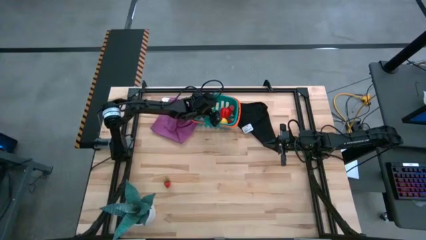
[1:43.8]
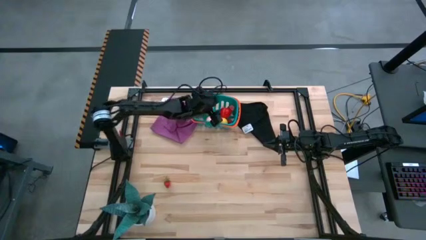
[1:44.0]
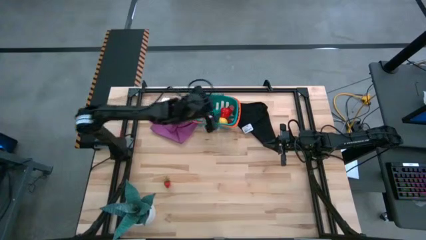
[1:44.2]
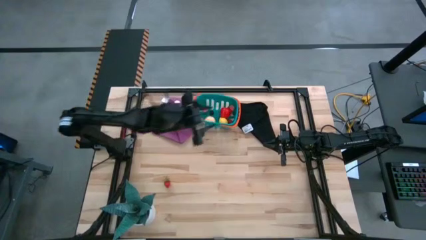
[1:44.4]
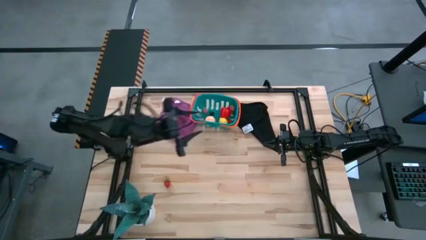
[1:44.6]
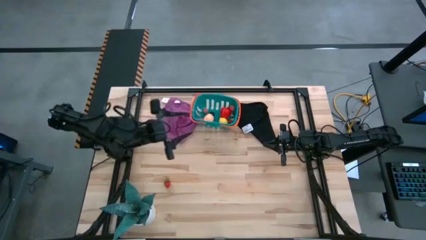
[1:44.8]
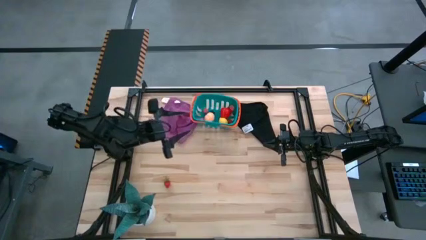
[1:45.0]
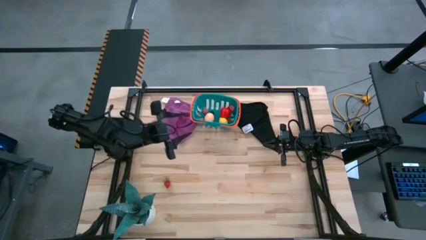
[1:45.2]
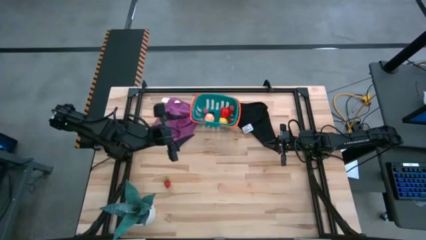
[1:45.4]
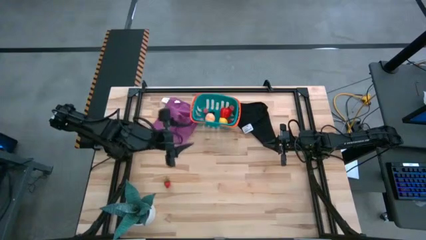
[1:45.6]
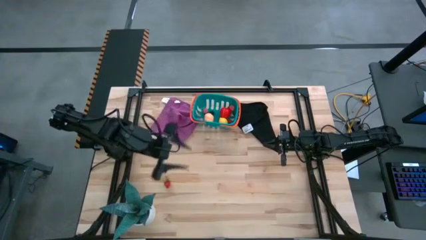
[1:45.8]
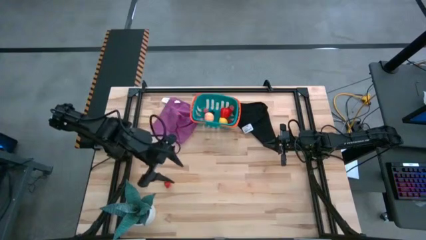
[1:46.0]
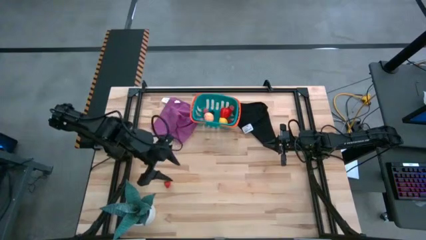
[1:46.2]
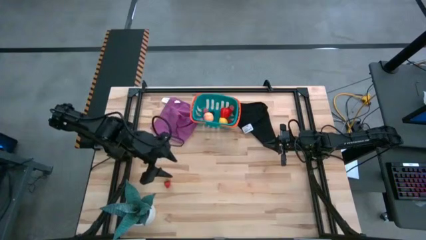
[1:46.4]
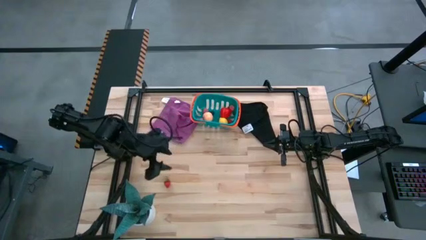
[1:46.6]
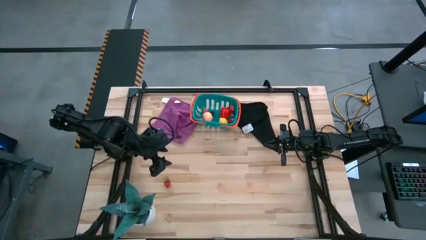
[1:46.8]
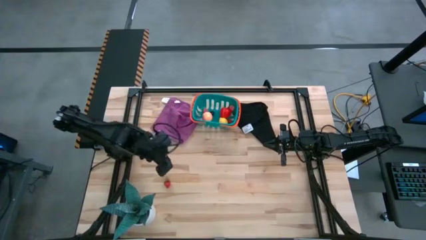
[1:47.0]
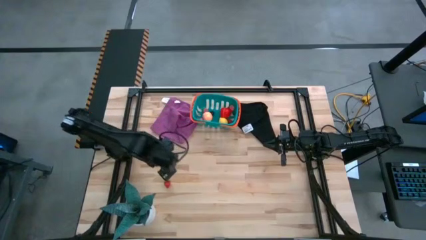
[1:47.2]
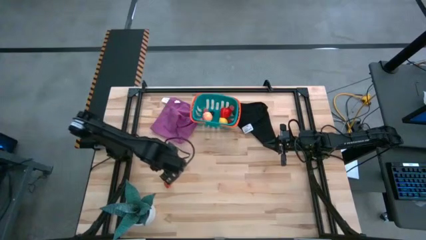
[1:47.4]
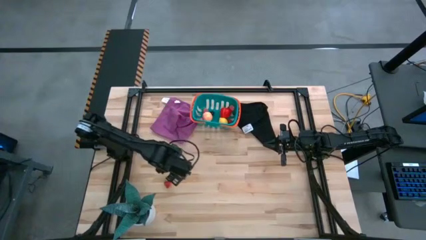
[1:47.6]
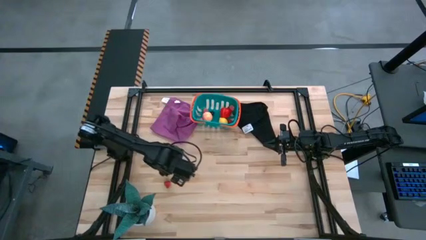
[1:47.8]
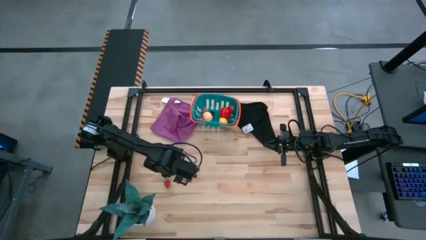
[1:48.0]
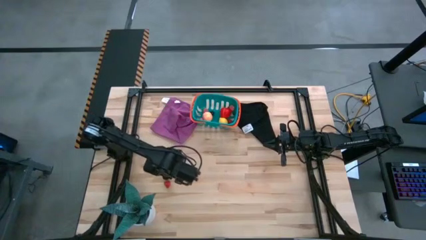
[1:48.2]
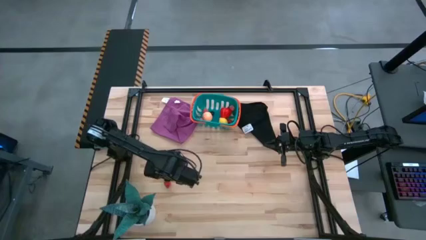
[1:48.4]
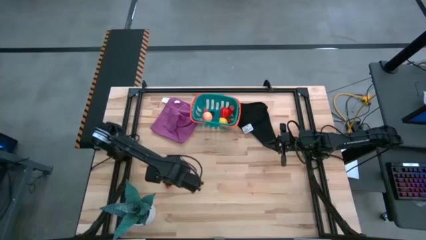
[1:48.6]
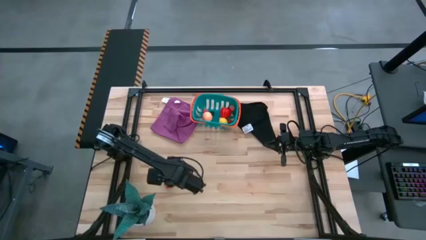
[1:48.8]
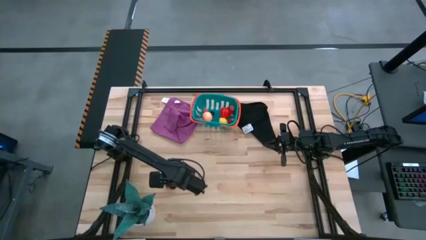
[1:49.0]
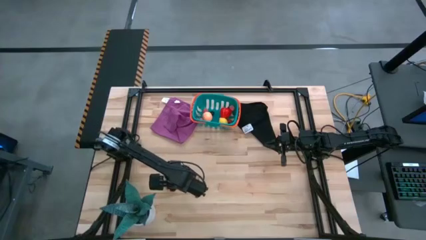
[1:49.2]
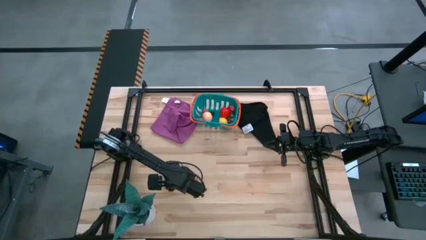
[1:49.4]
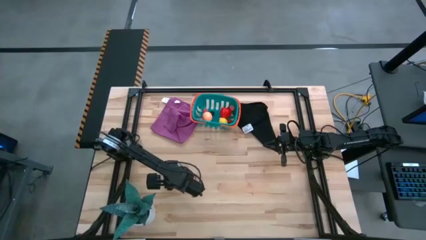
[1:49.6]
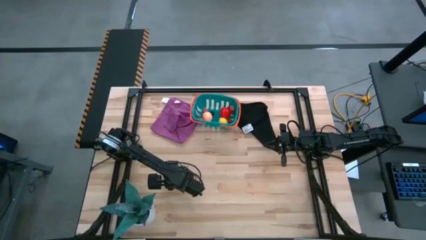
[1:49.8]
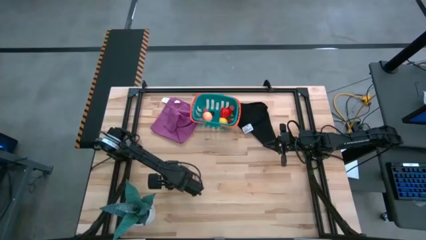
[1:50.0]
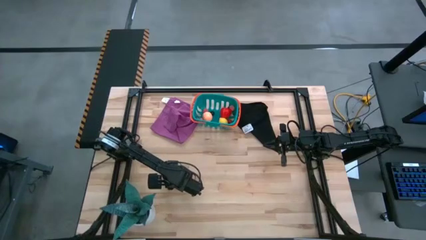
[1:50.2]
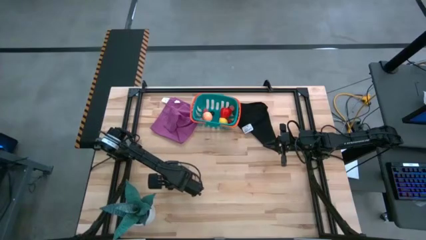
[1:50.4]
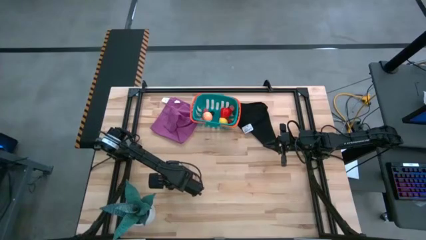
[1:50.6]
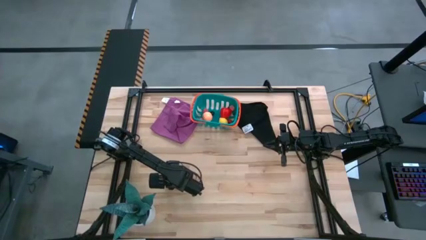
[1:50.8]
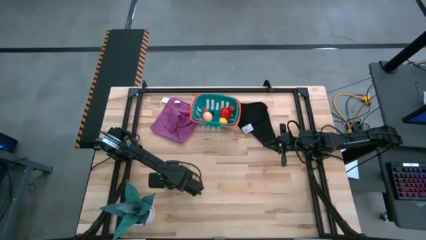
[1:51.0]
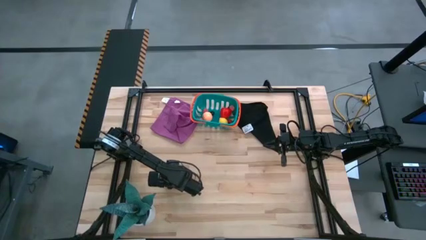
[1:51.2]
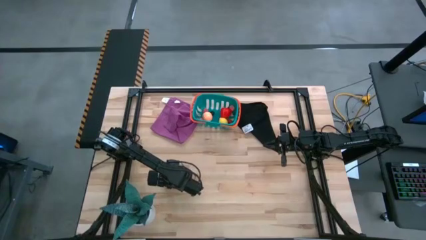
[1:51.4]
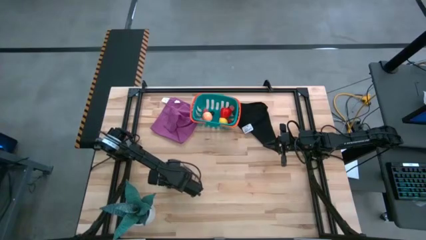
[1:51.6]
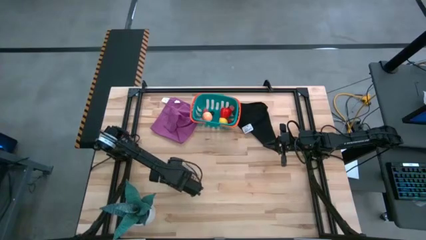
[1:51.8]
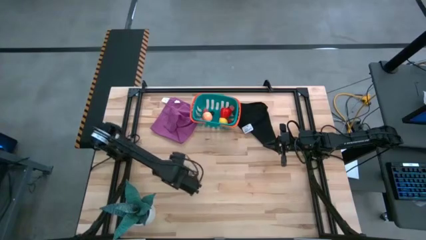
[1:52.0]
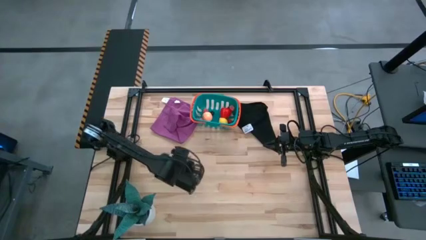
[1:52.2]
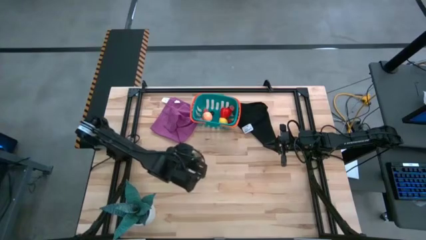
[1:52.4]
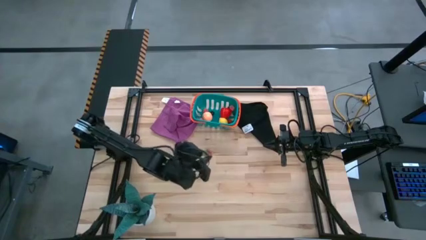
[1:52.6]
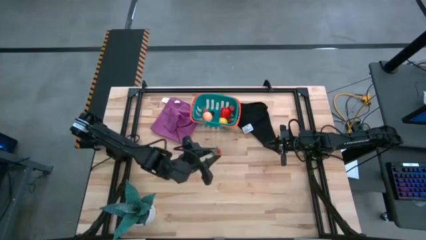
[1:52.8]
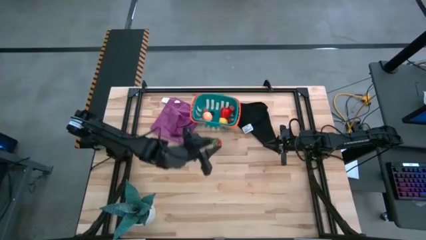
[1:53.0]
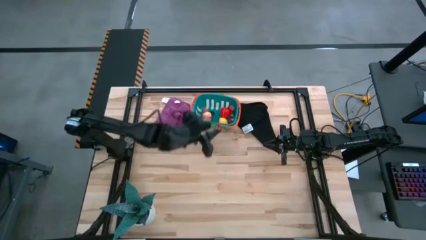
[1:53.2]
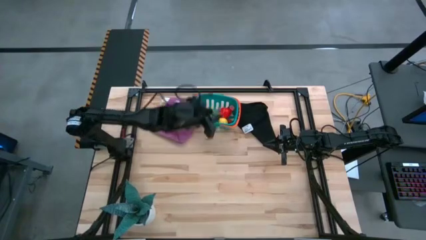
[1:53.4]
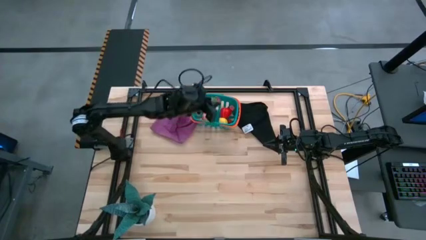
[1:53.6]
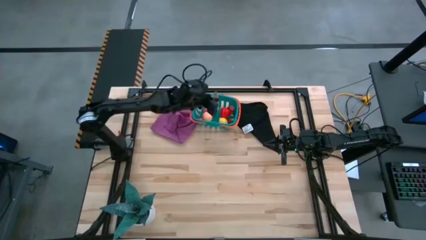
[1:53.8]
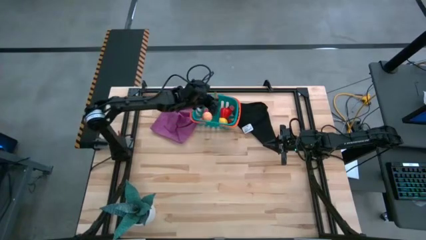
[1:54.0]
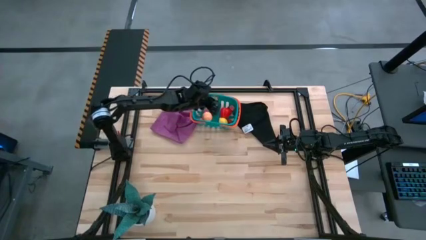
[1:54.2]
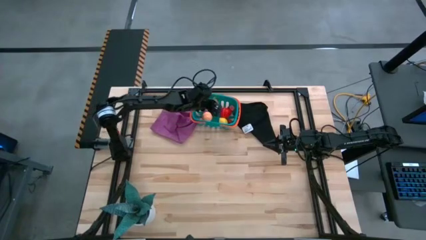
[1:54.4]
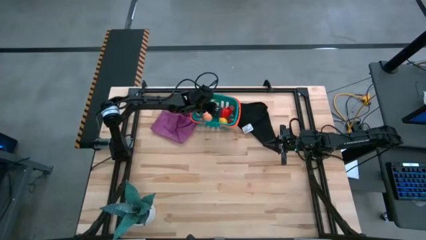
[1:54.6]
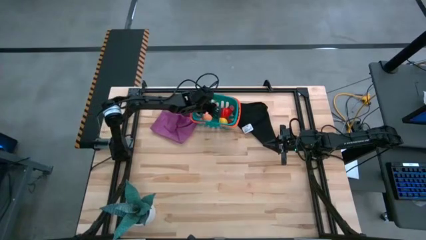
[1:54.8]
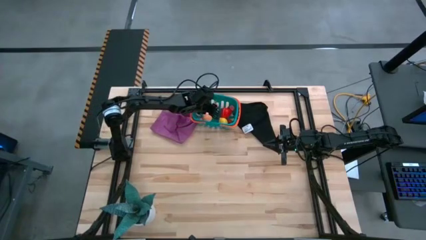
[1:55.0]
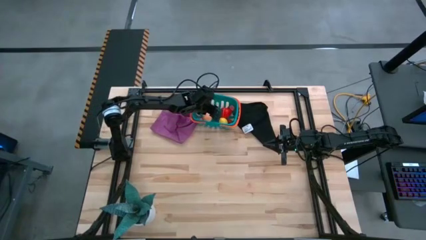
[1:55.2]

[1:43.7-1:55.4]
Task: Pick and placing Produce into tupperware
Put the red strawberry into the blue bin
